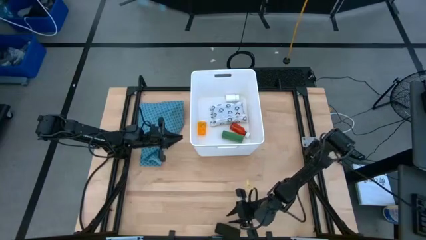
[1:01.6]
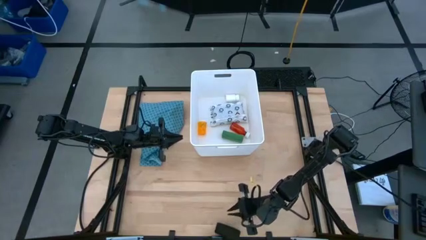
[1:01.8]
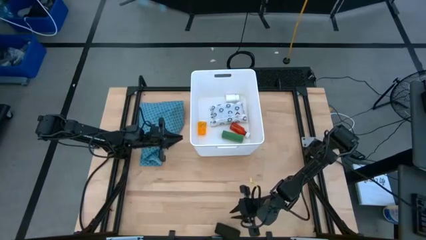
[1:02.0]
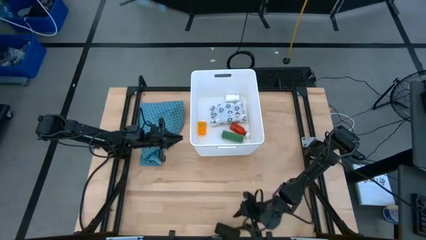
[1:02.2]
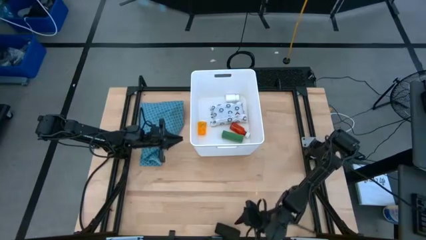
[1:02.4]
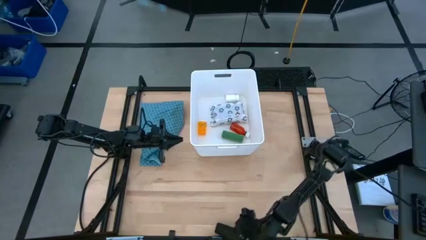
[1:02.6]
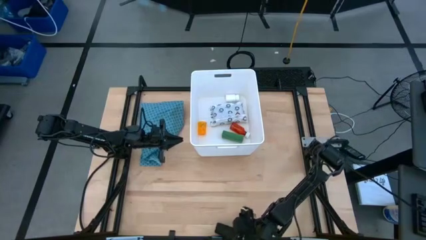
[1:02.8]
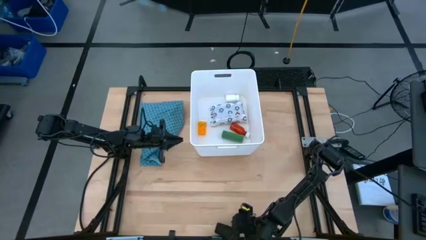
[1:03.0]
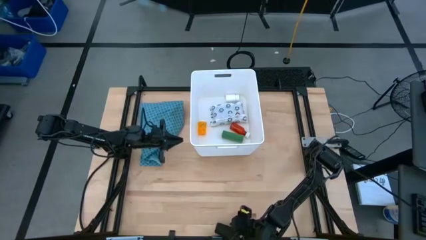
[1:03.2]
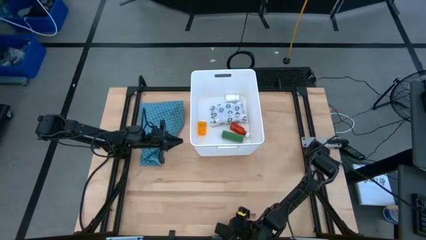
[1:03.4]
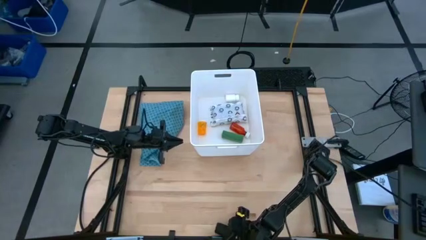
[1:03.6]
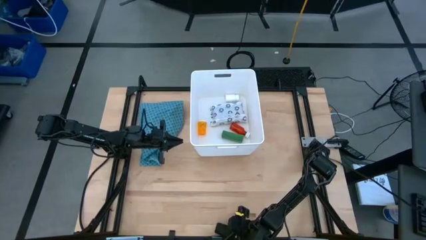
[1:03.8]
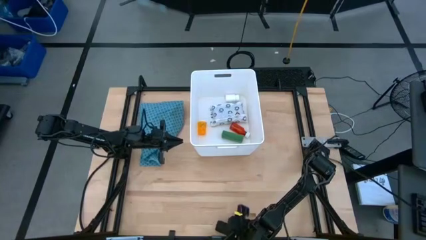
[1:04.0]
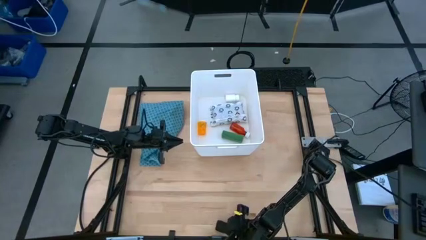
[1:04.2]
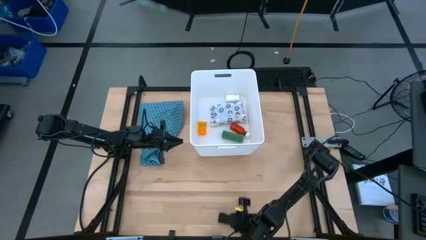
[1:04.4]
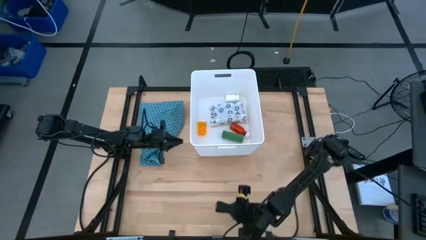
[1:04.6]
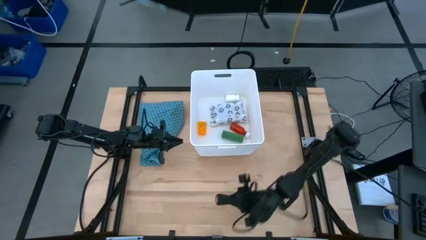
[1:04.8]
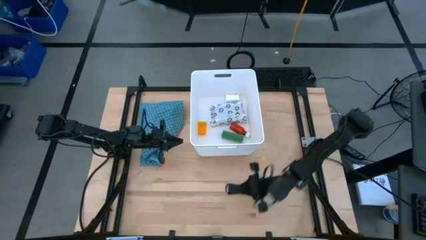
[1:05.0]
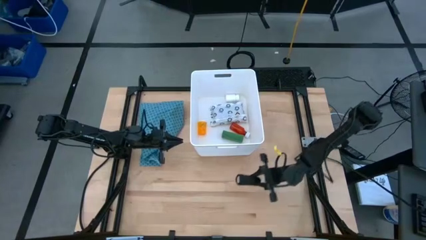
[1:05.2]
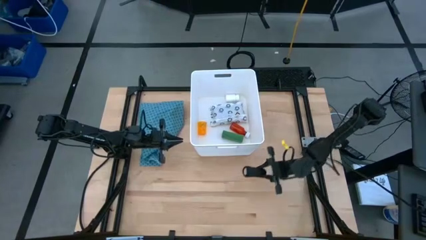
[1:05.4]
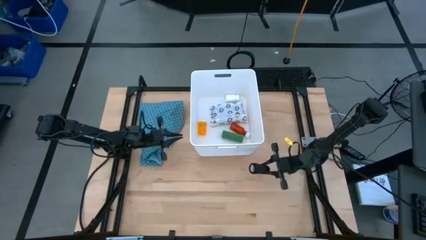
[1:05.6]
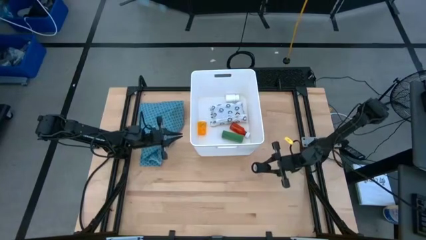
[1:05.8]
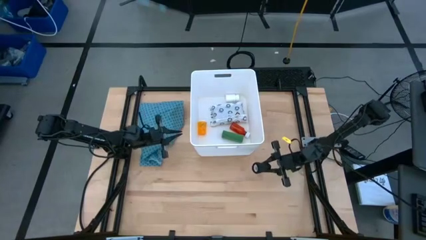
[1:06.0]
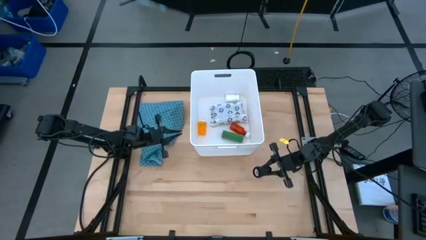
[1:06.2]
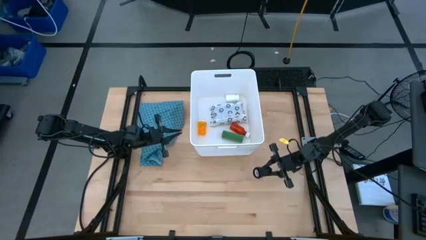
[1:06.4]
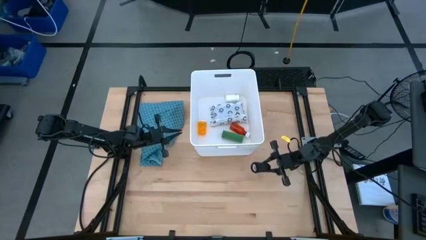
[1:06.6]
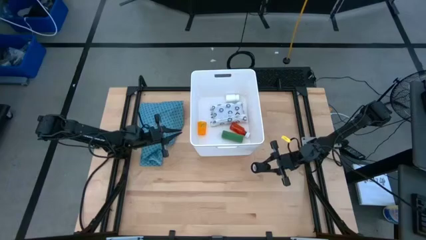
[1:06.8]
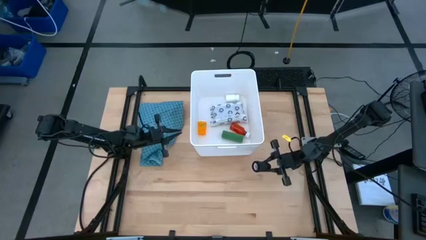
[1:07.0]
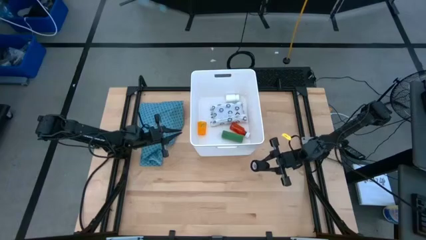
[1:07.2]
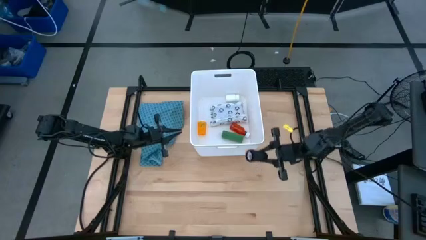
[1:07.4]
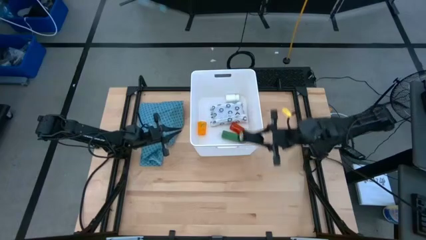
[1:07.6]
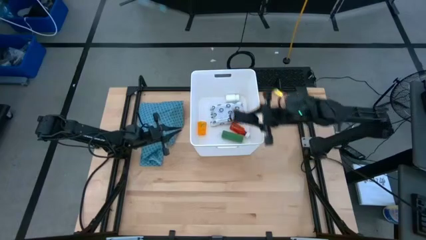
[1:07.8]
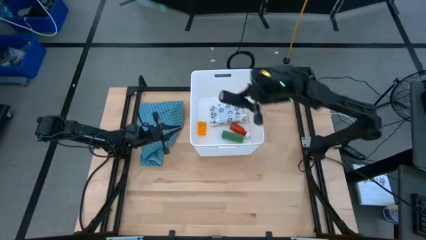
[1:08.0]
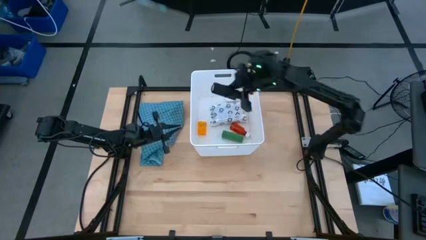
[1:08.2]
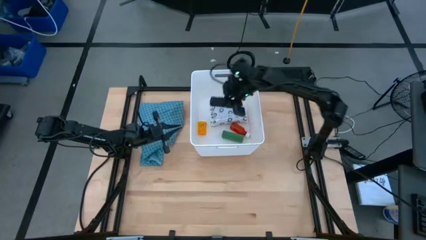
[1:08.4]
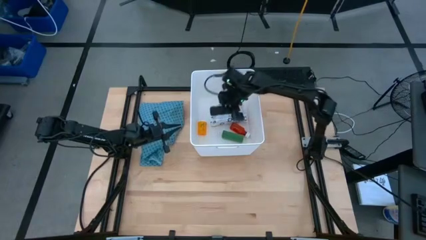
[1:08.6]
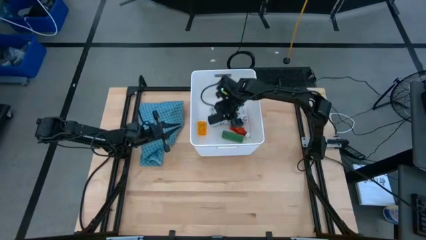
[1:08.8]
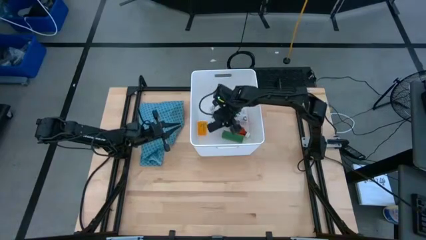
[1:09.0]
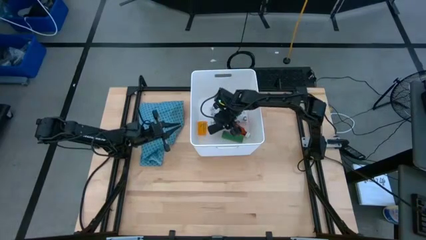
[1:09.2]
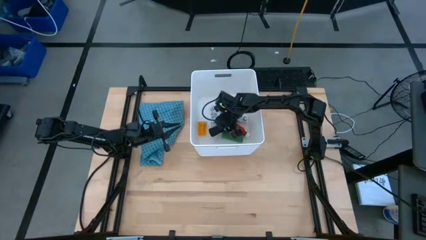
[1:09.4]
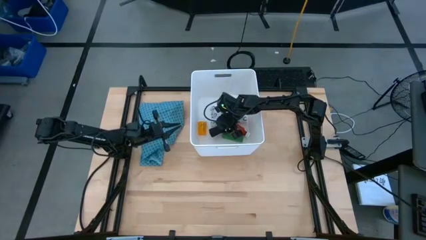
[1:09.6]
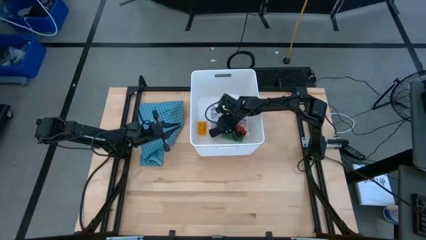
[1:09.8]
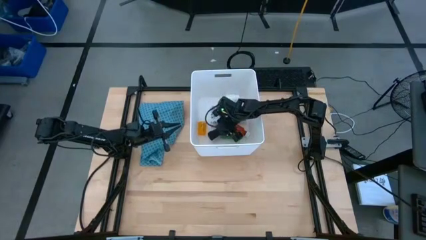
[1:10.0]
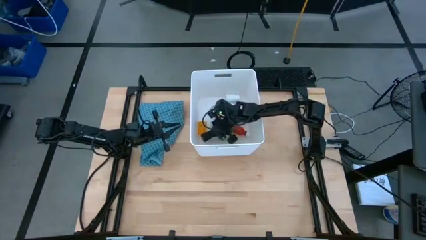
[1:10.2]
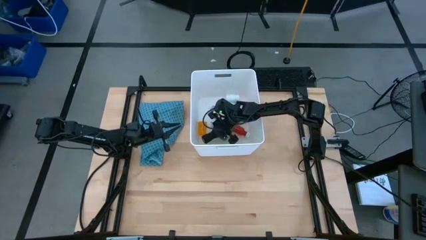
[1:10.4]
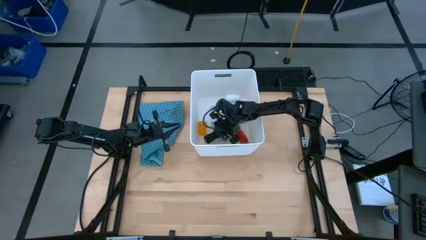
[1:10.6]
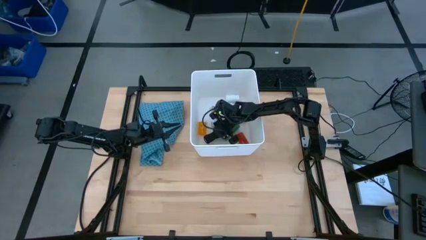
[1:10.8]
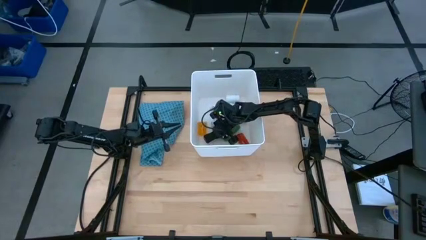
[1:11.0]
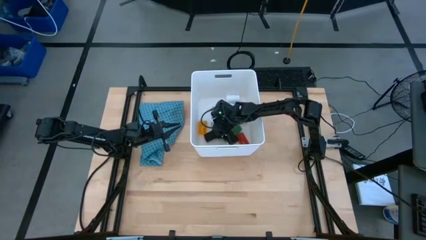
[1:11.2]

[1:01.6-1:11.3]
Task: Pick & place medical supplies in basket/bin
Put the black rolled bandage in the white bin

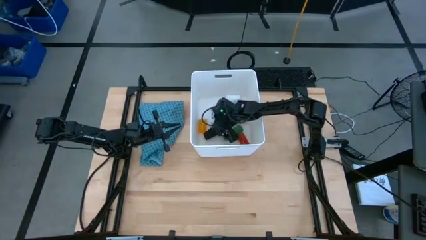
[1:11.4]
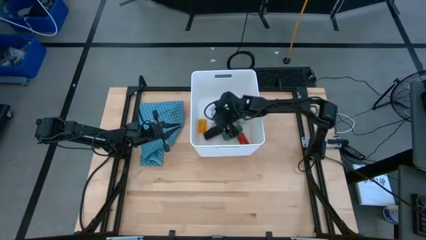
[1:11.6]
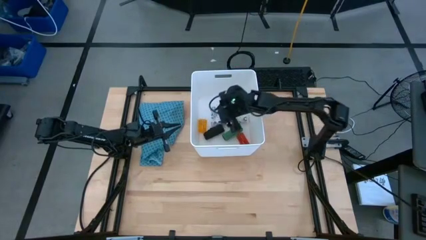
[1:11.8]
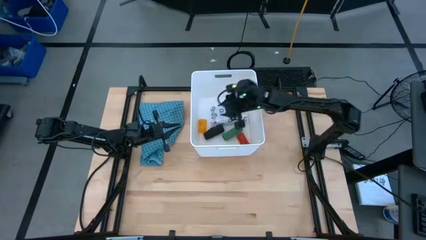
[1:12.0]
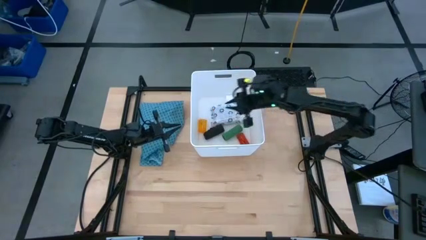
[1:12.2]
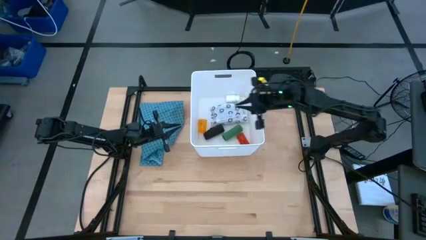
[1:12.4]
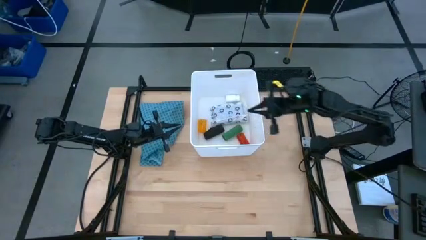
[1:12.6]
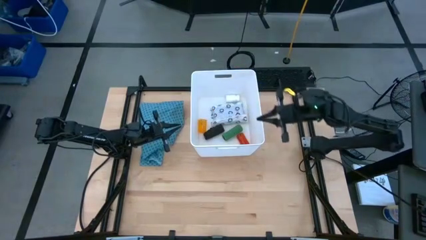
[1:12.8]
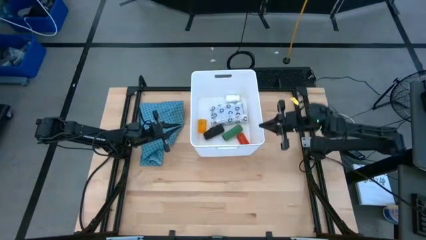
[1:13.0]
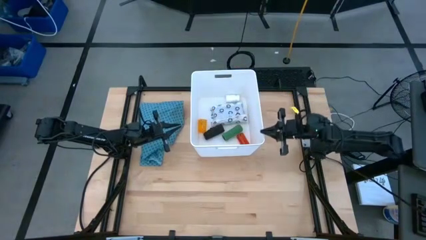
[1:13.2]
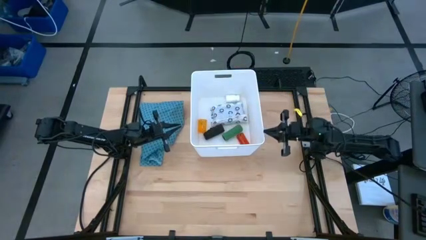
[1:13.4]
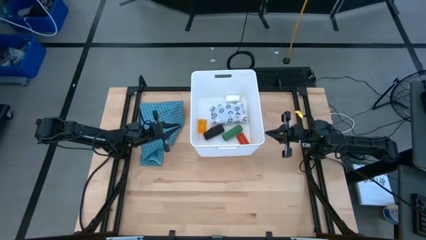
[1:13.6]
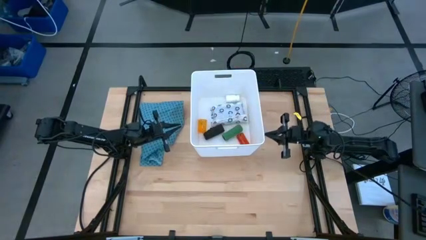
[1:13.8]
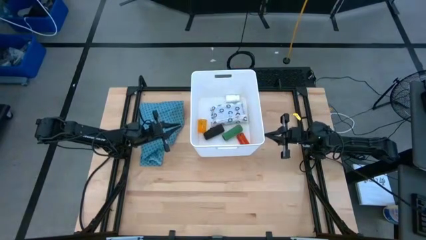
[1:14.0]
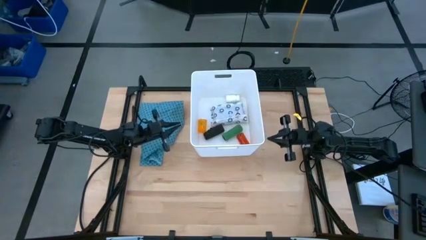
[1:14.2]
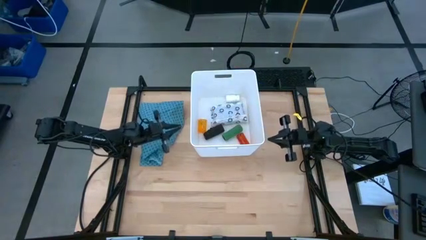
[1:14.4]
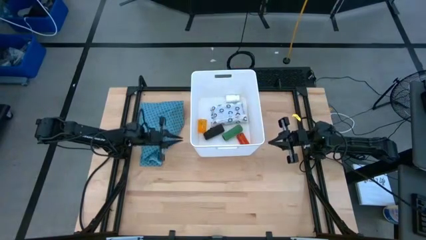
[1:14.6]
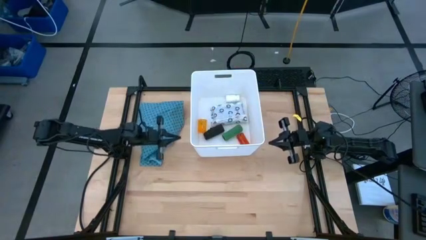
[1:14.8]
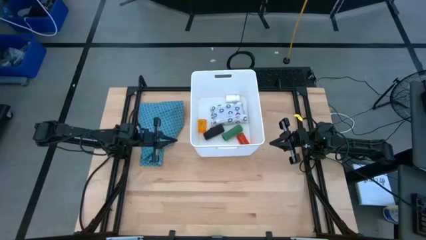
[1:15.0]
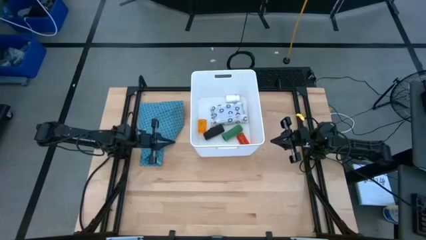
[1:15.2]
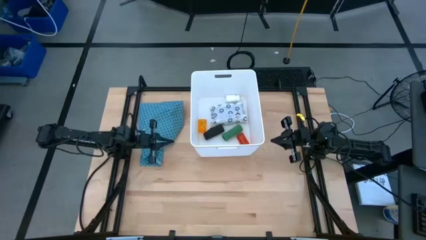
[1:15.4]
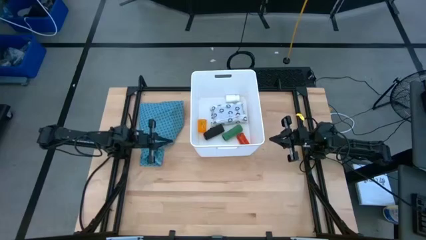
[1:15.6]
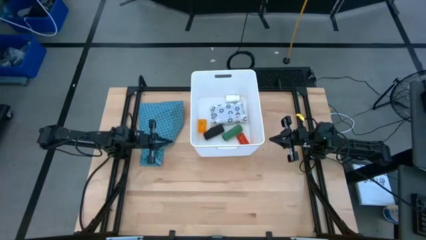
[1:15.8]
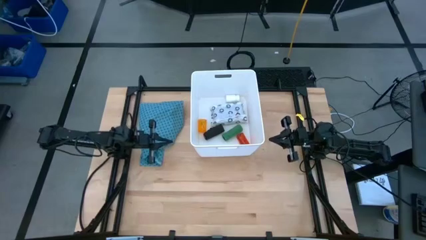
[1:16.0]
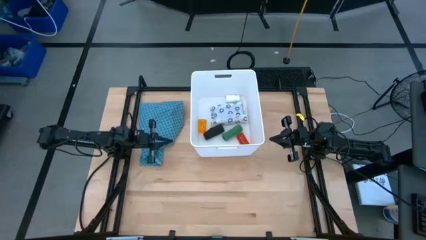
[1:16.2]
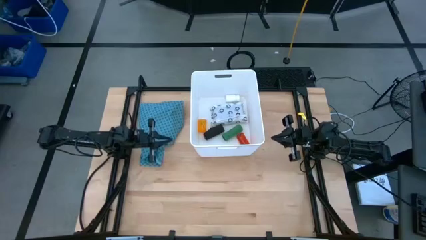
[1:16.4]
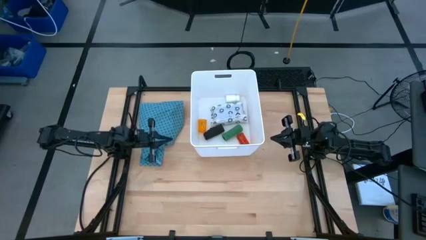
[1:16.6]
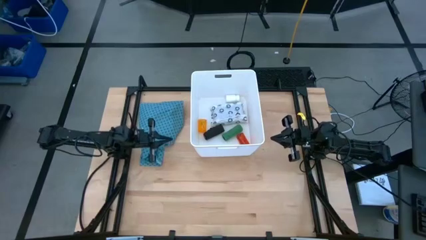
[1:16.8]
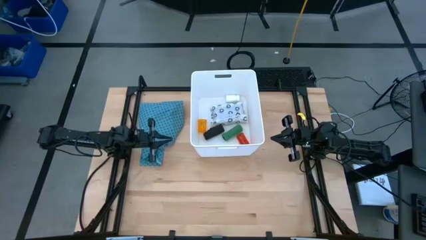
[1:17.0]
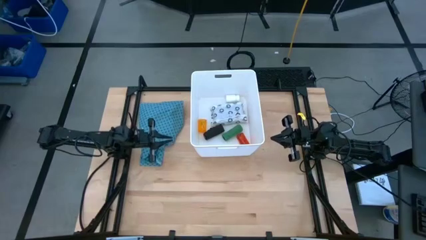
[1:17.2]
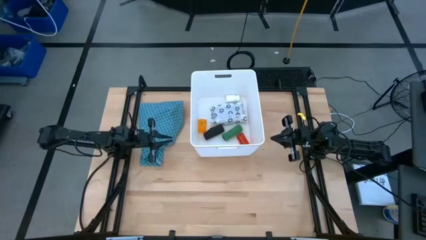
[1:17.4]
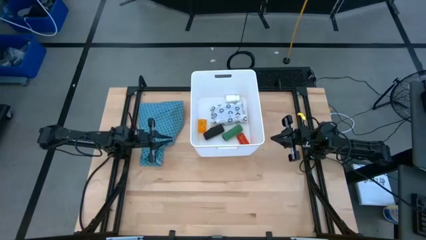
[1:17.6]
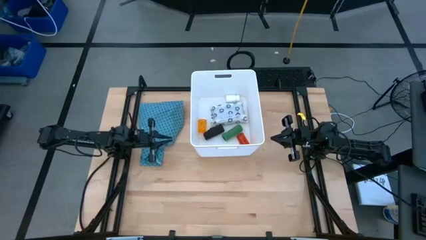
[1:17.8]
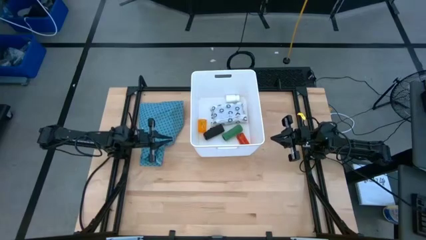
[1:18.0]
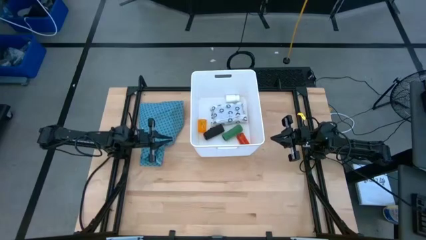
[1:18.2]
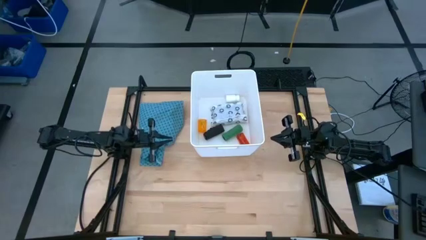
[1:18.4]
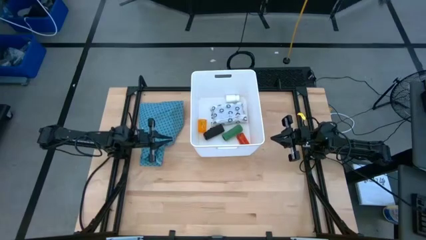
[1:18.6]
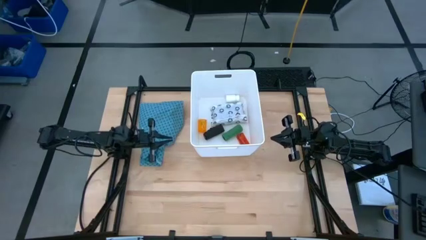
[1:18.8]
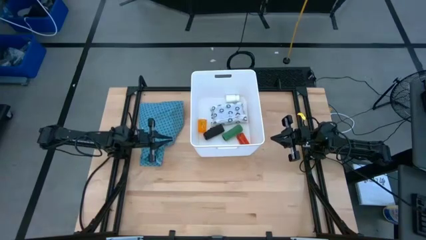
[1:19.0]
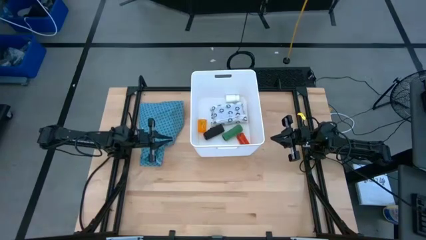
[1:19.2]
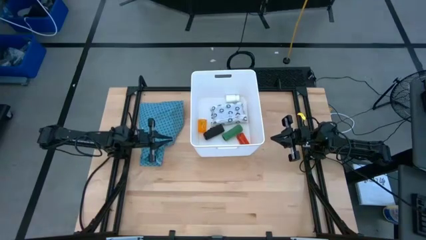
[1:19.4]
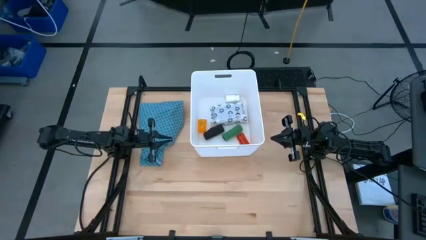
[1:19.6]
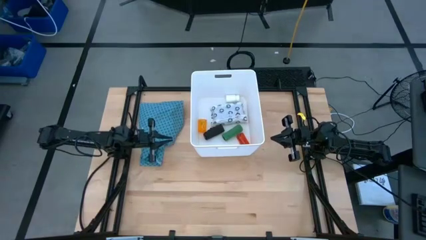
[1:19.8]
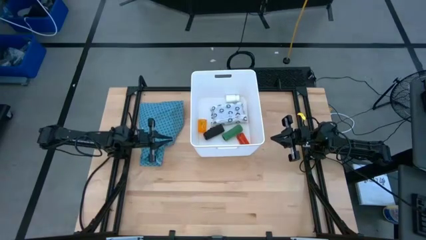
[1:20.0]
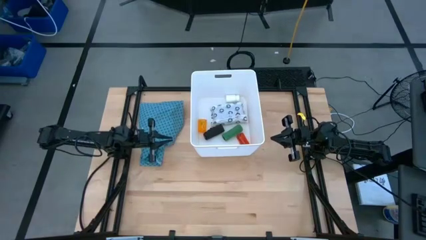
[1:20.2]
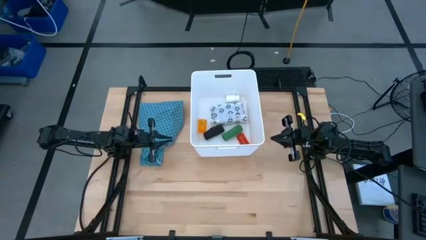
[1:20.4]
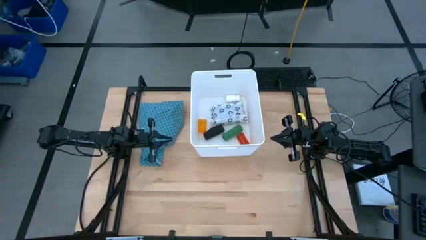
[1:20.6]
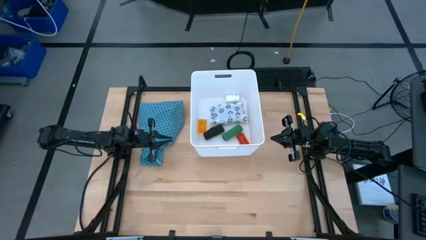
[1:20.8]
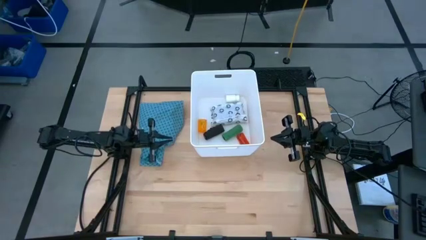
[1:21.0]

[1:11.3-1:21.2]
Return to Home Position
